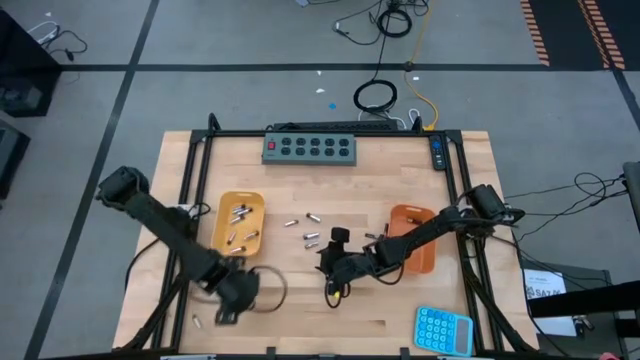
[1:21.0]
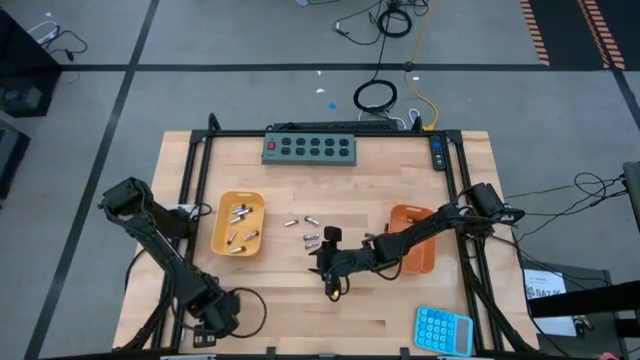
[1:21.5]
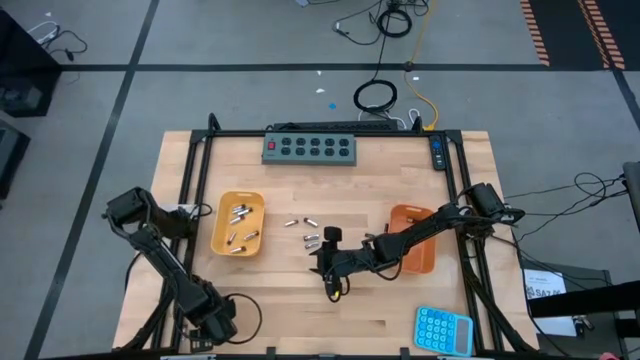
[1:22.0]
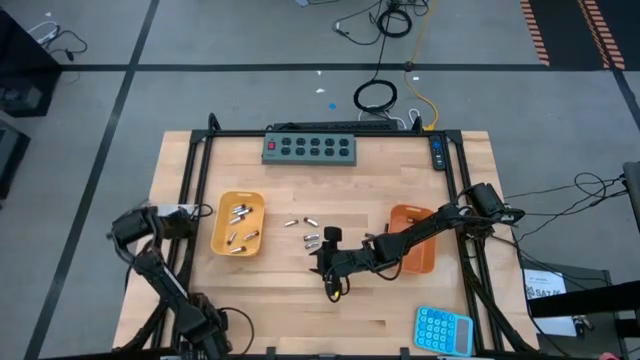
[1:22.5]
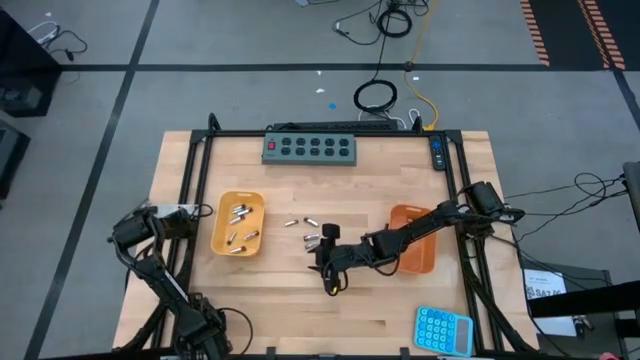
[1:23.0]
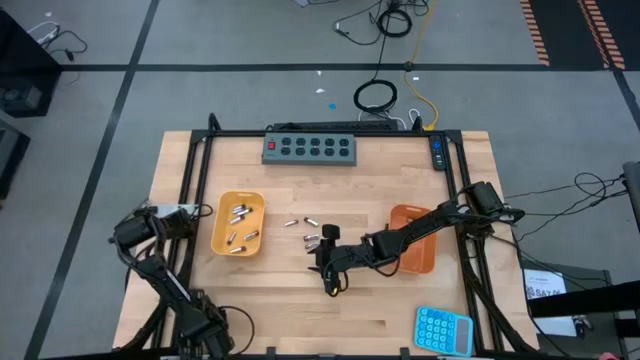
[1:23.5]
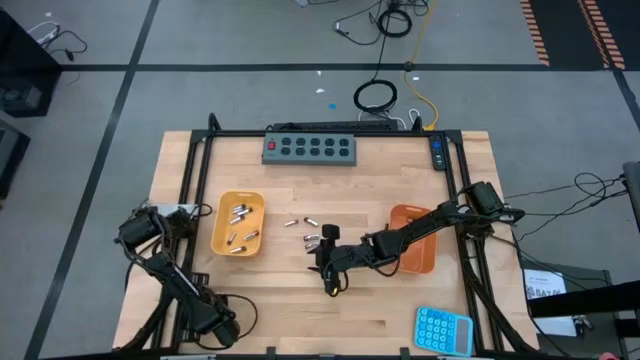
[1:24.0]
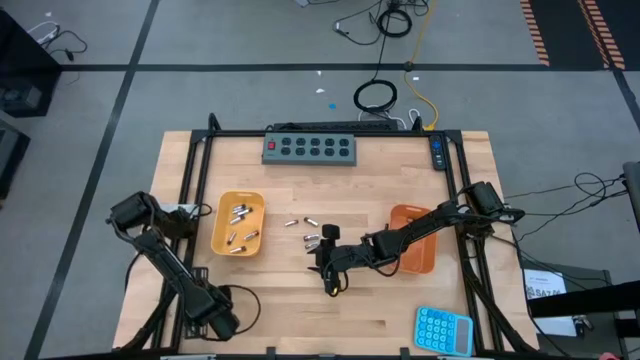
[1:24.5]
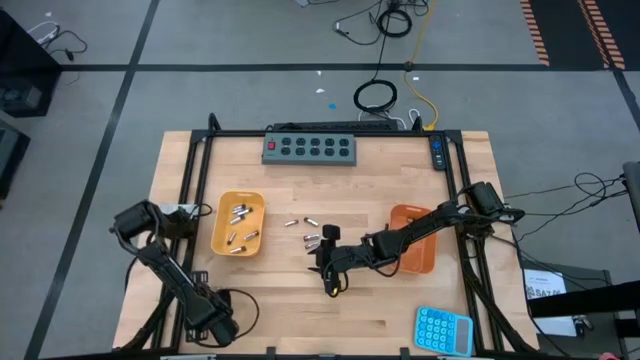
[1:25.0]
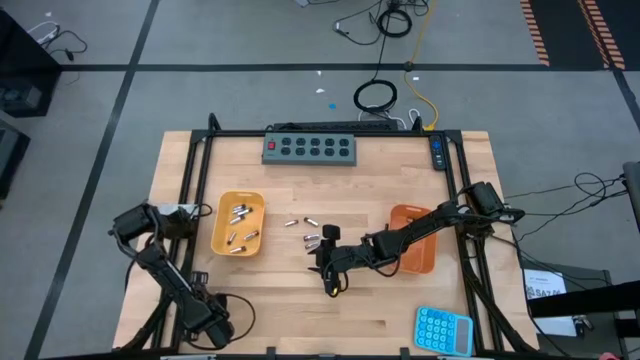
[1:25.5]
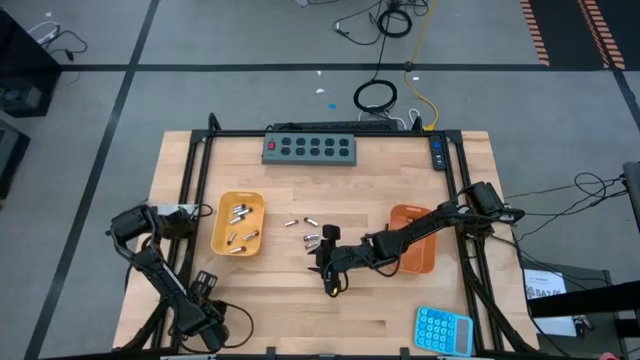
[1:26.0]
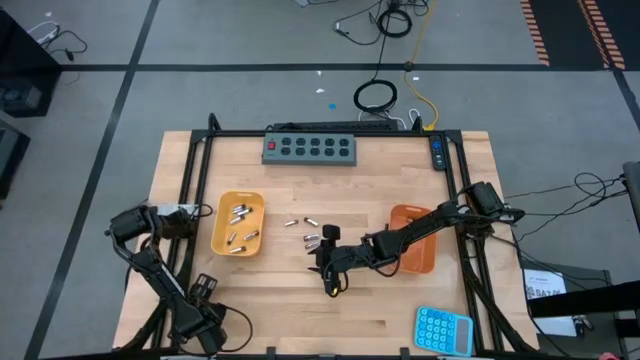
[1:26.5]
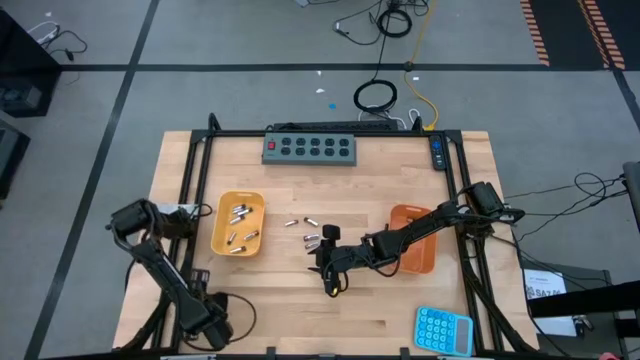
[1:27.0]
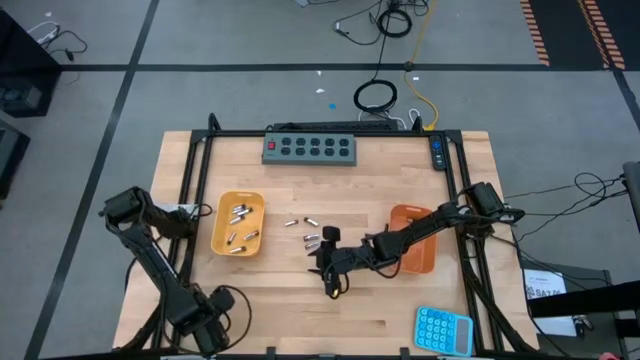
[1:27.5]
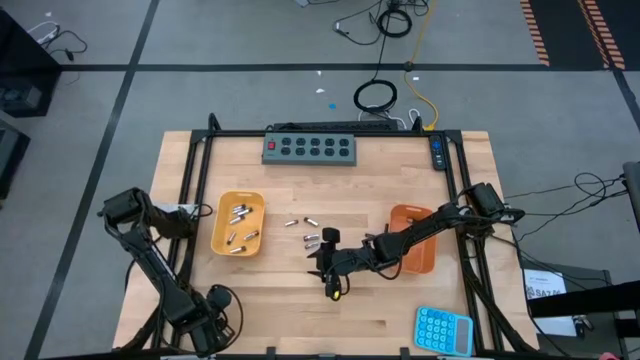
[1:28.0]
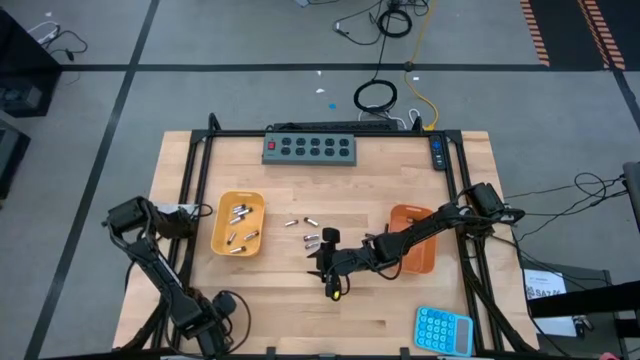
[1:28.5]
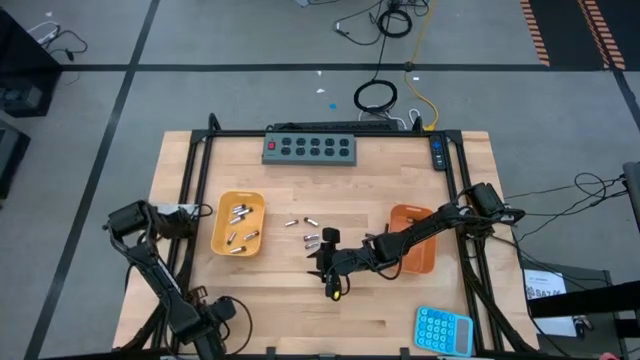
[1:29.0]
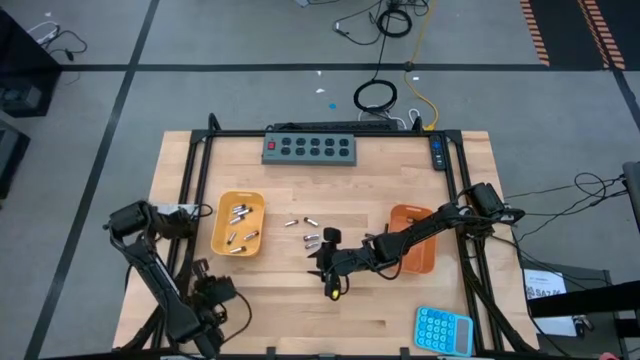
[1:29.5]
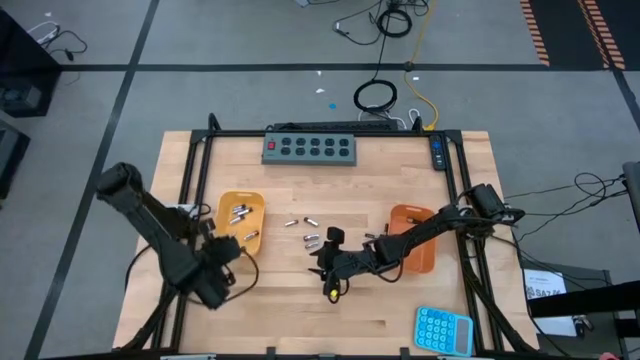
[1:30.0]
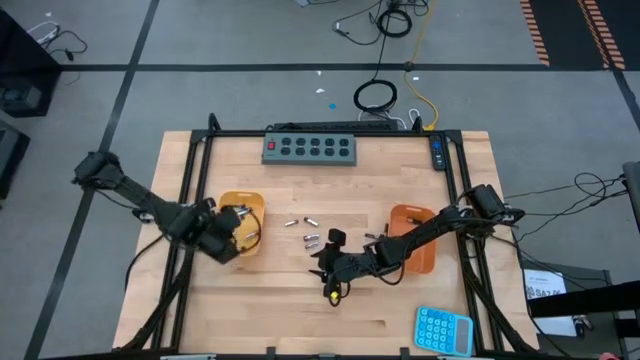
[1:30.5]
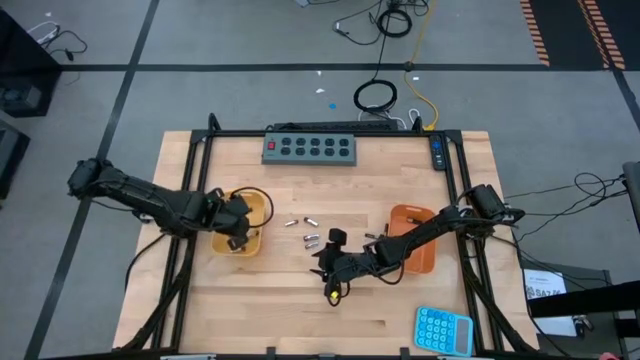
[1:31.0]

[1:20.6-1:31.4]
Task: Sort batteries
Put the silver battery into the yellow bin

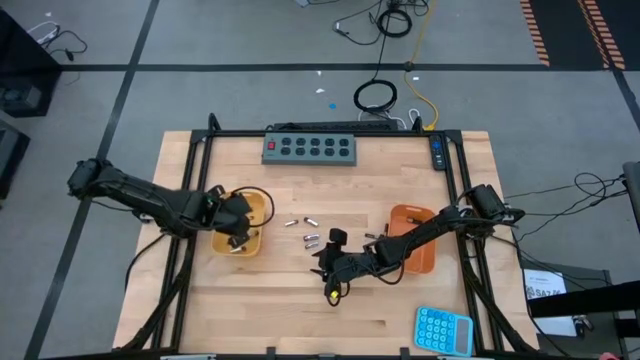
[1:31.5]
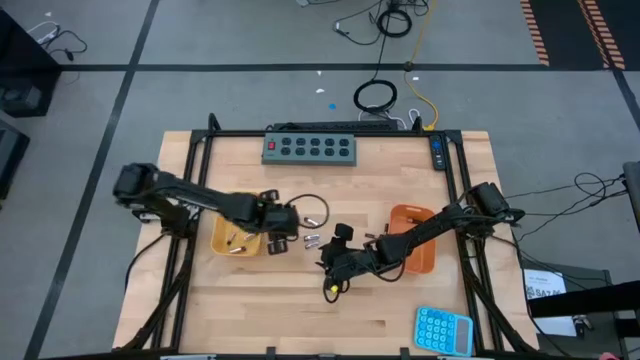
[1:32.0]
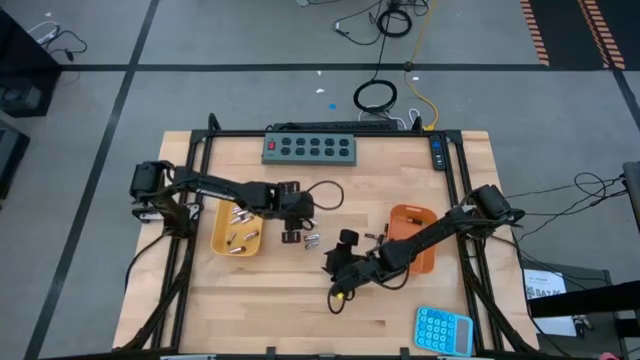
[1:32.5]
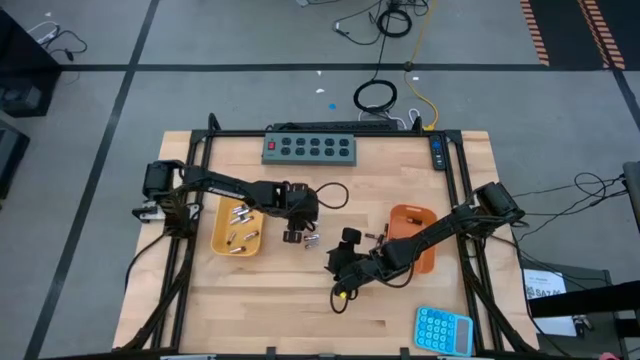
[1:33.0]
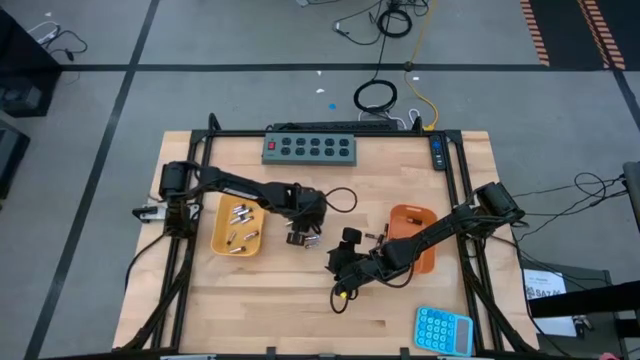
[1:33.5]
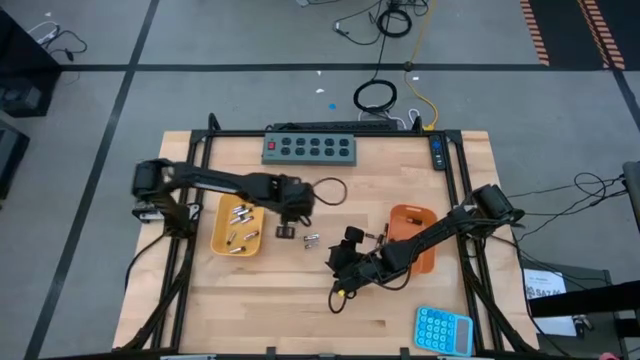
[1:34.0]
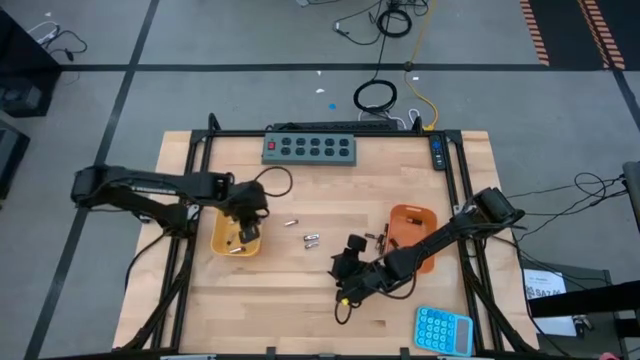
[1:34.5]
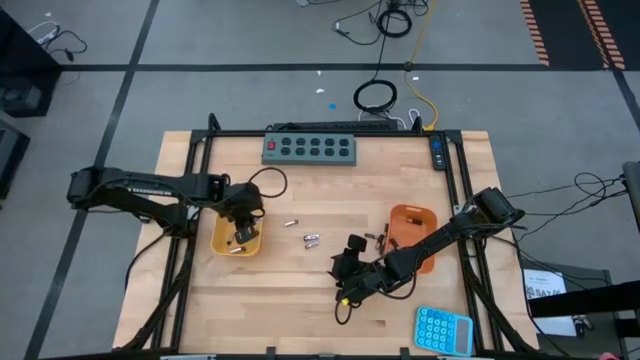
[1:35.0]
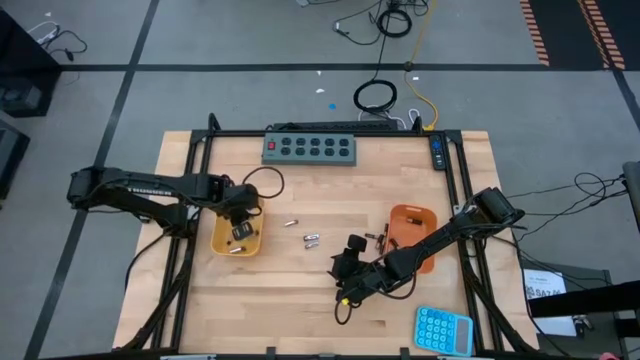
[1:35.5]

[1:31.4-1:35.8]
Put the silver battery into the yellow bin

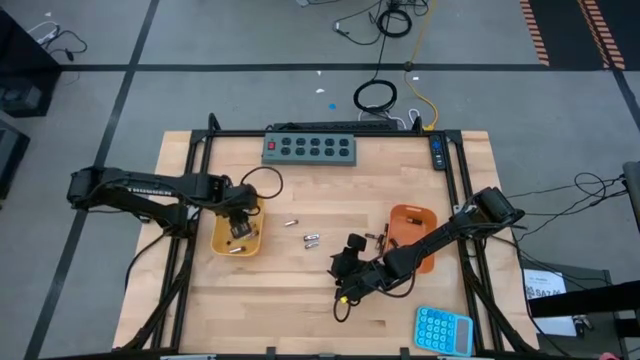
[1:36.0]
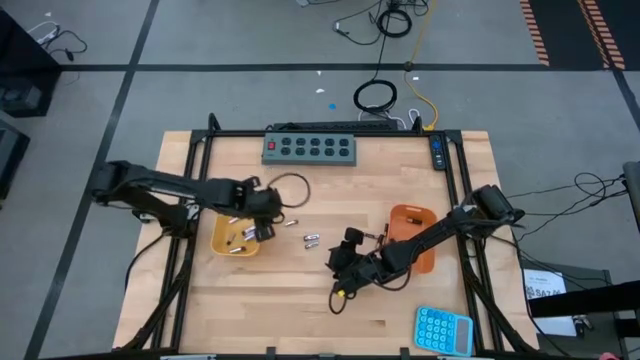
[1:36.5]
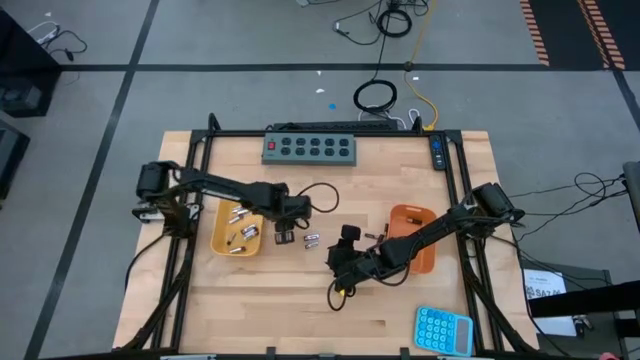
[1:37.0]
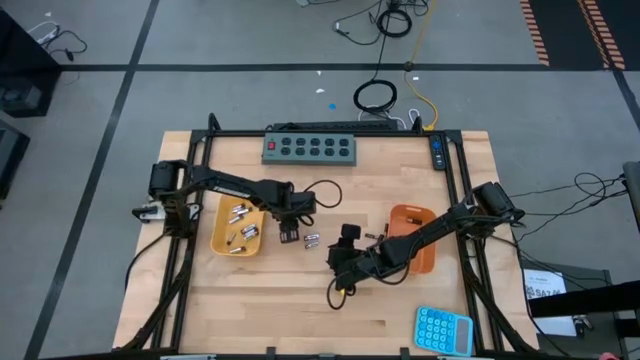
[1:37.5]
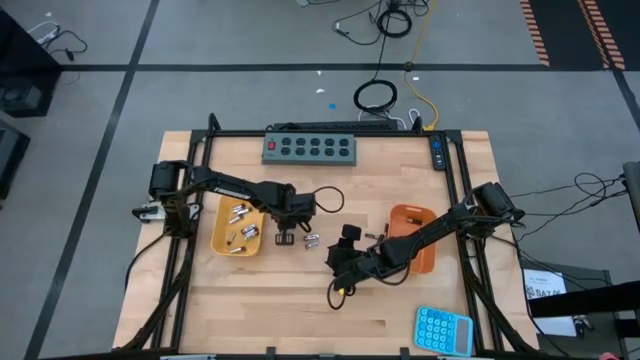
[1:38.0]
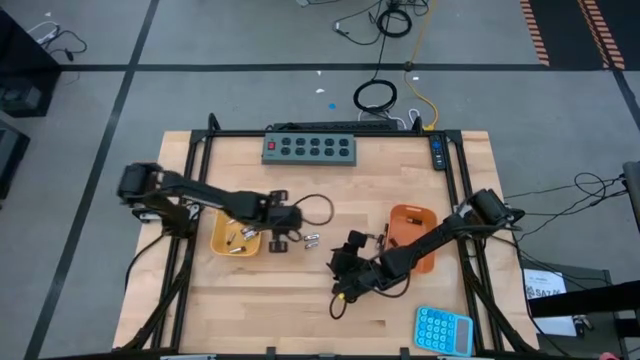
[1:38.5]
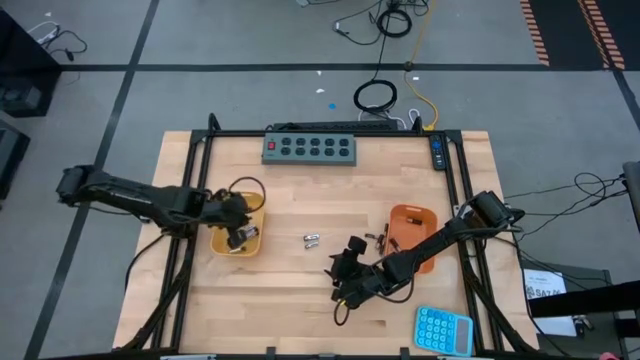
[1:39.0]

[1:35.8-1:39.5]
Put the silver battery into the yellow bin

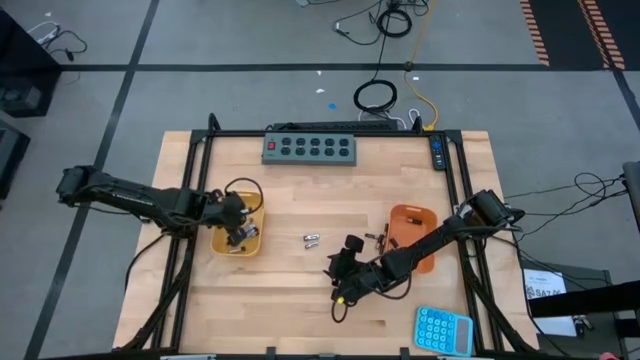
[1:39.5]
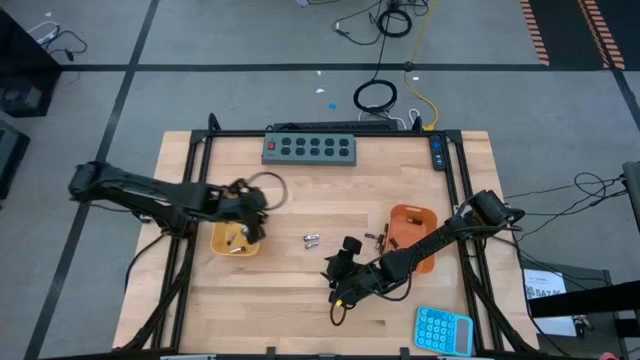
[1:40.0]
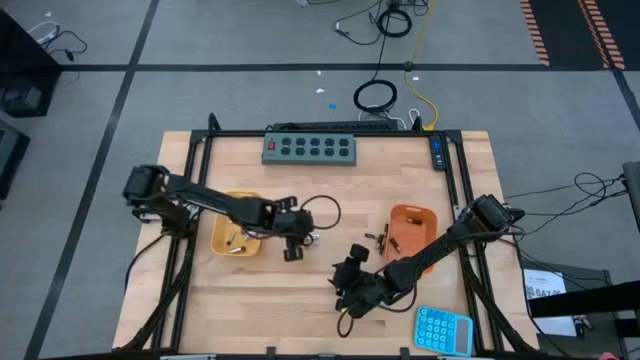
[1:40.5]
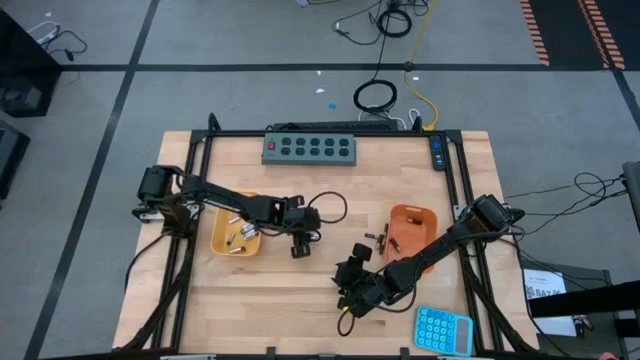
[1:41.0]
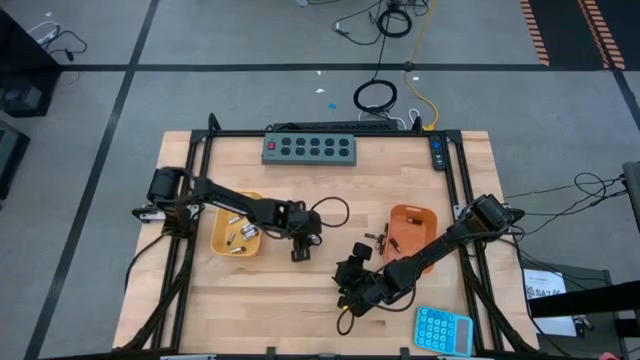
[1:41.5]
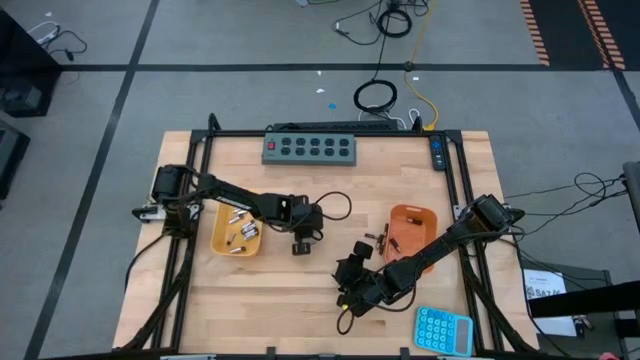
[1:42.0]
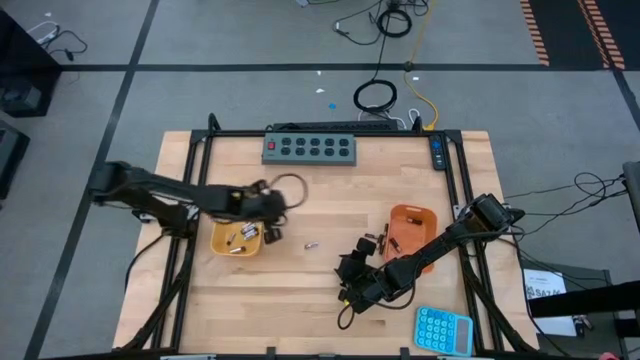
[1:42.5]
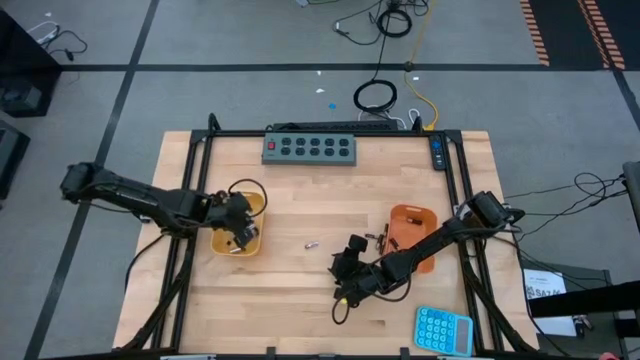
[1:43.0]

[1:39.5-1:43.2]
Put the silver battery into the yellow bin
